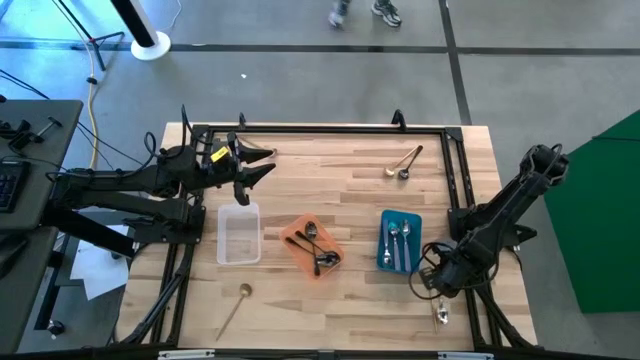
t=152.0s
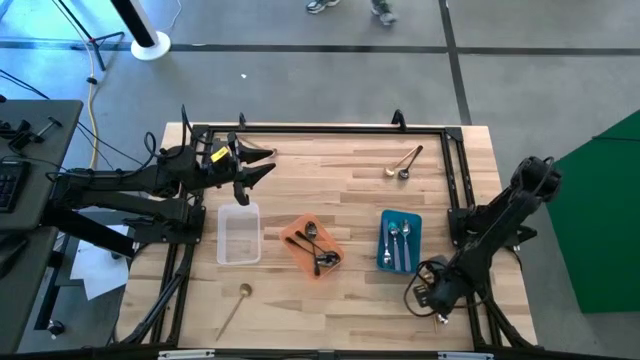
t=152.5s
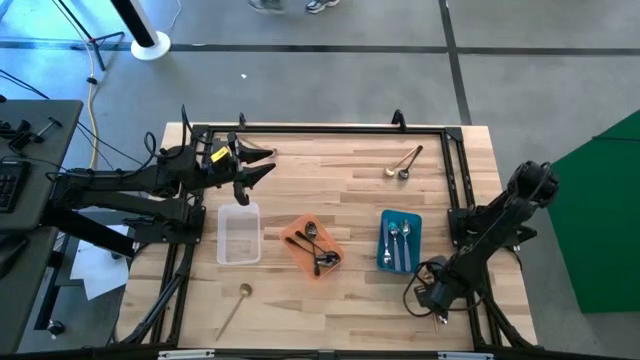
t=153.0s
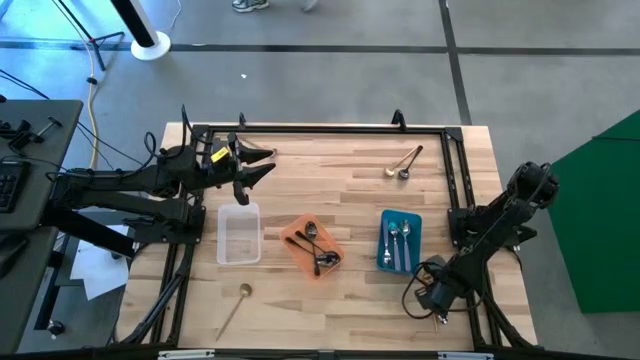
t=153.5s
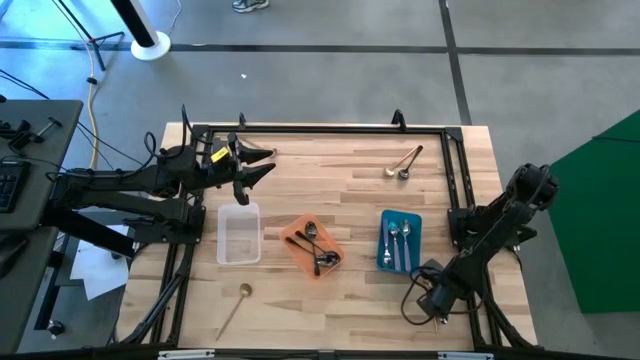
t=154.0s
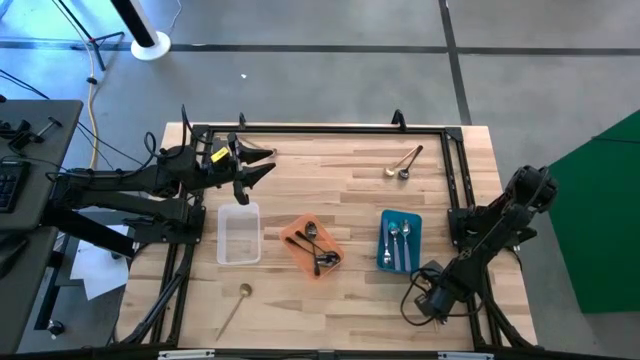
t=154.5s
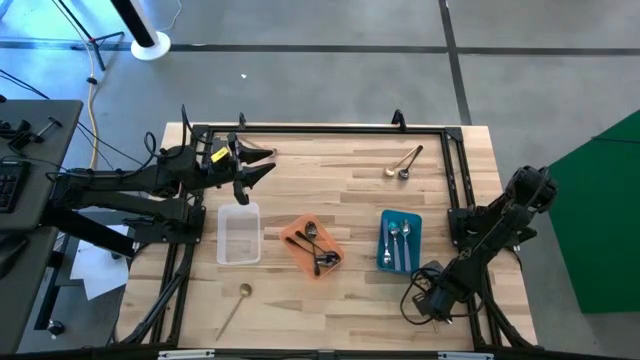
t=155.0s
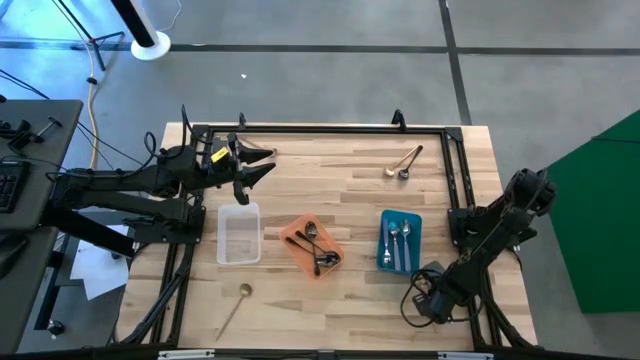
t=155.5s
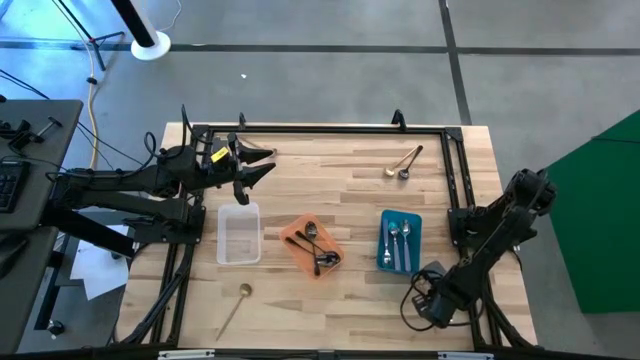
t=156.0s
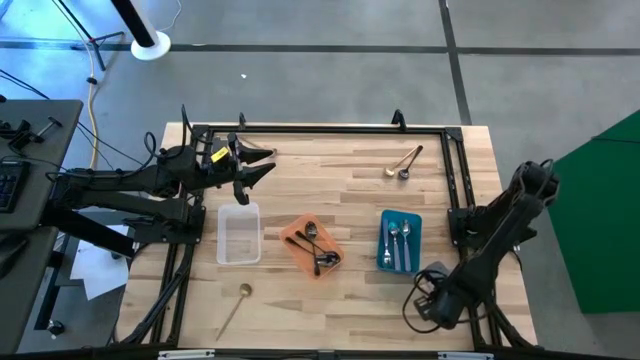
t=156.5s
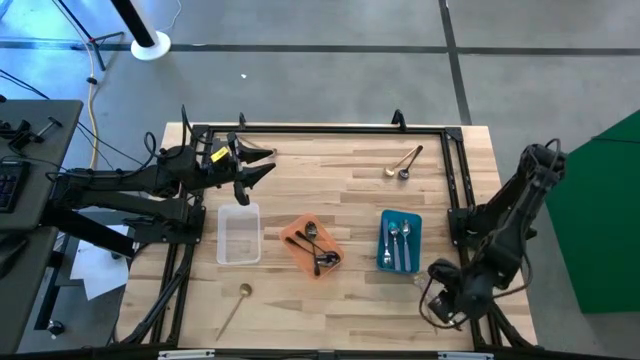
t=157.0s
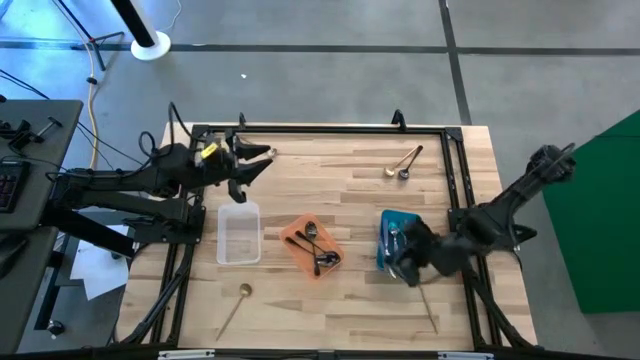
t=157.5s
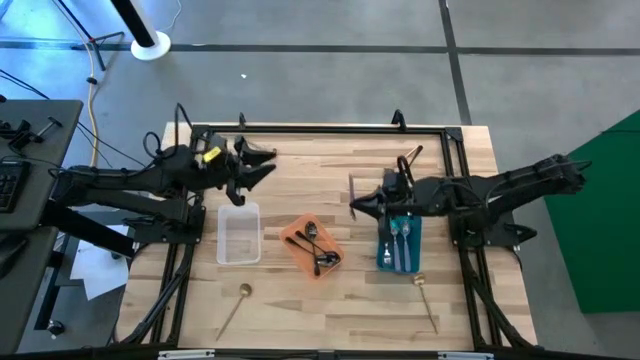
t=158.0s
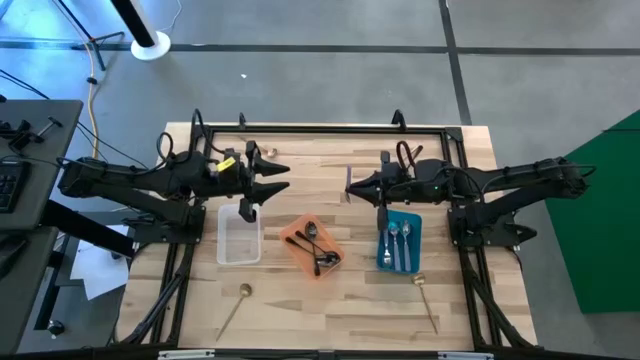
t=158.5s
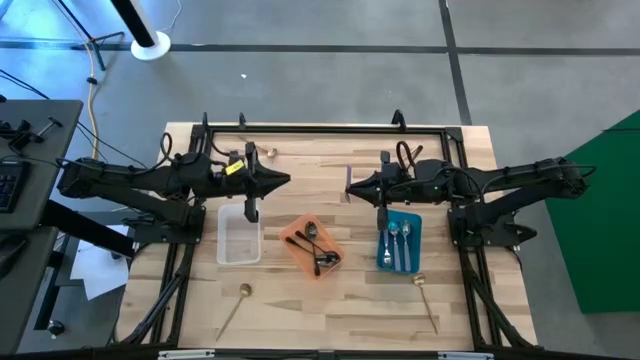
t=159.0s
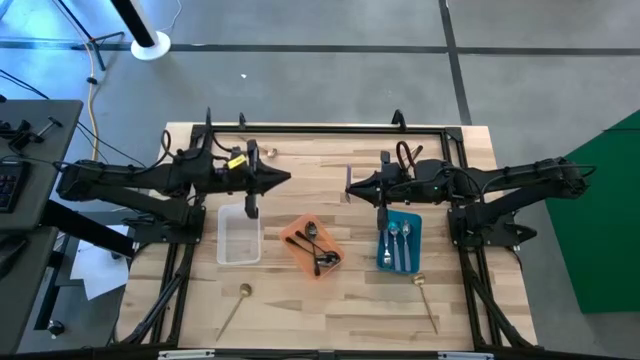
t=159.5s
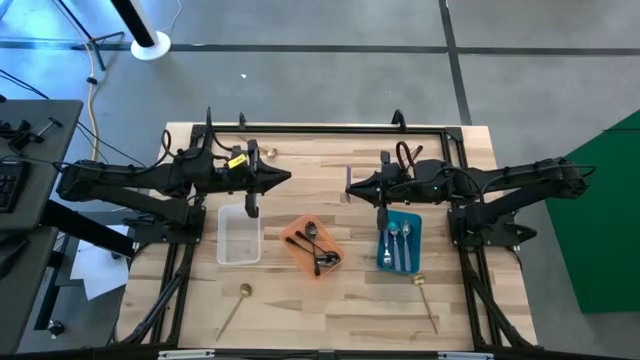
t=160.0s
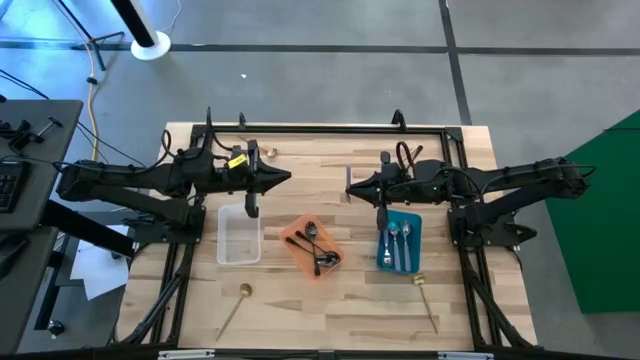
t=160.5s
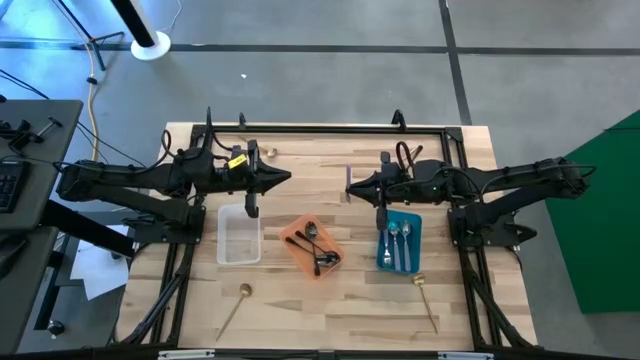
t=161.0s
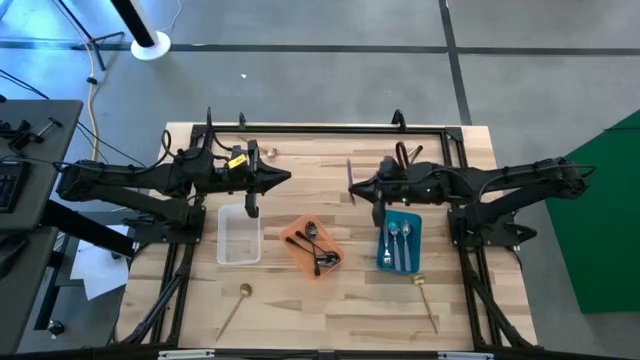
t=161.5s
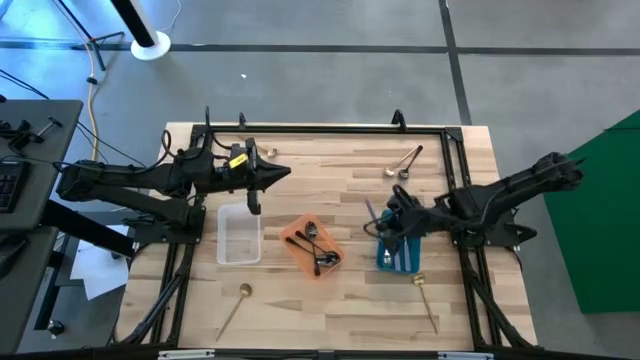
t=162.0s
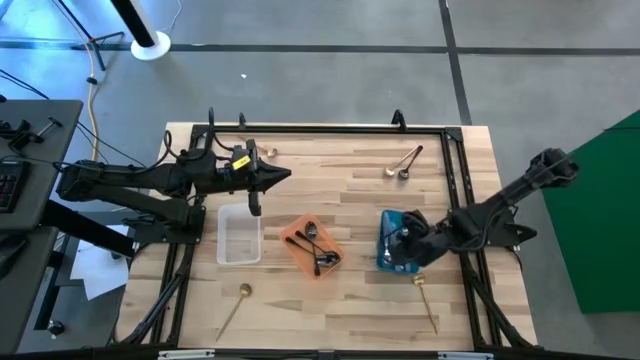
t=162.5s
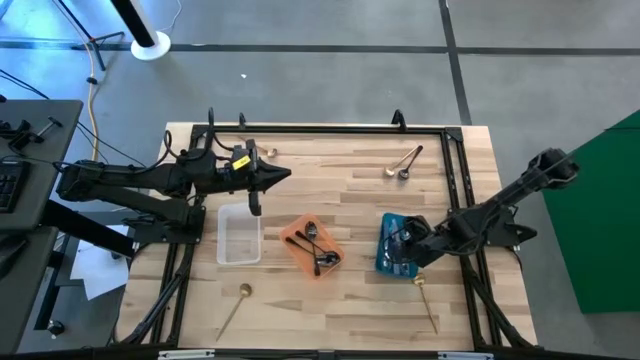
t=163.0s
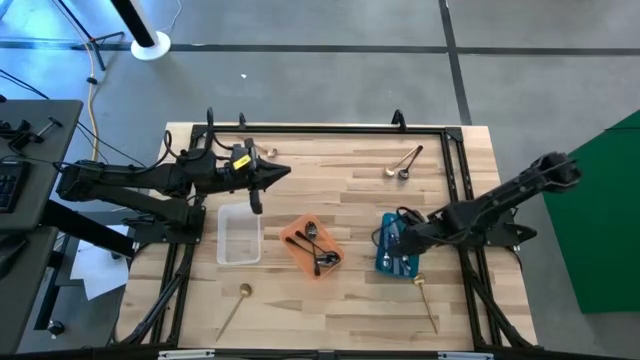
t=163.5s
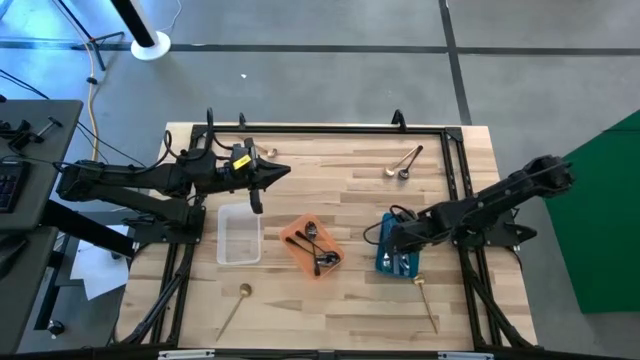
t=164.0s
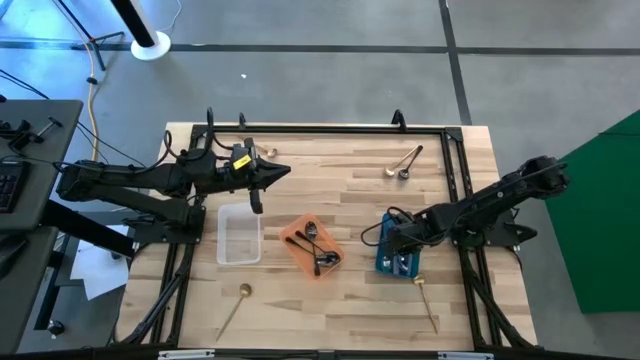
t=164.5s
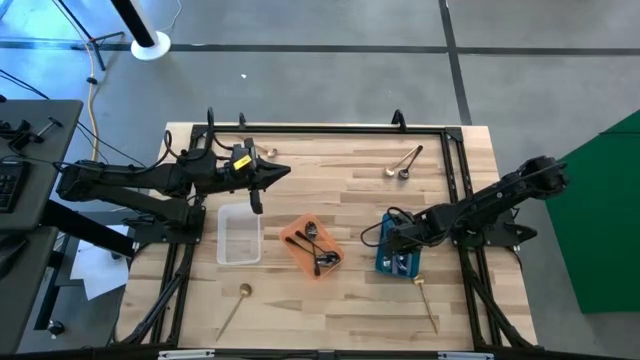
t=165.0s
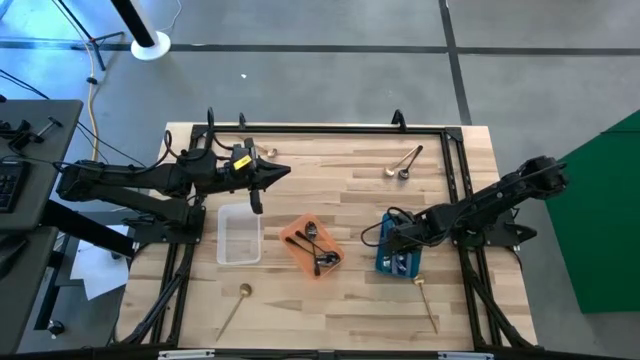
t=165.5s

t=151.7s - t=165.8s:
Task: Sort silverware by color (type)
Put the purple spoon into the blue bin
